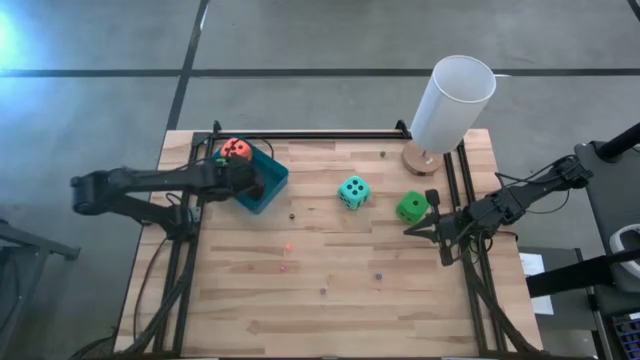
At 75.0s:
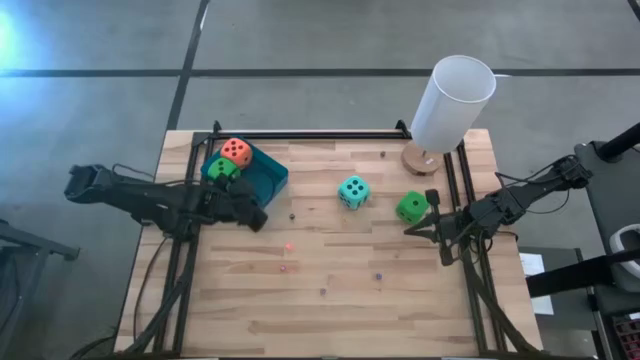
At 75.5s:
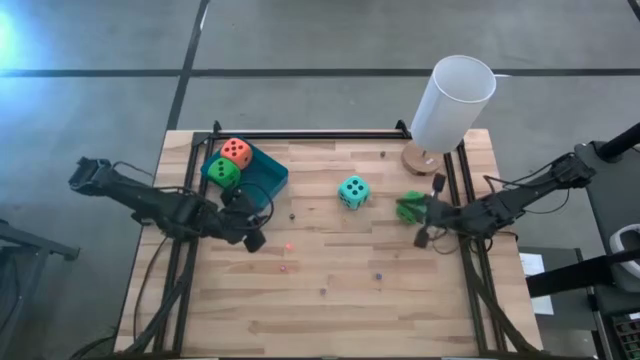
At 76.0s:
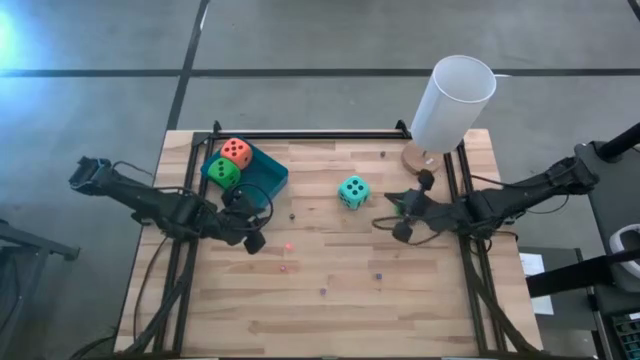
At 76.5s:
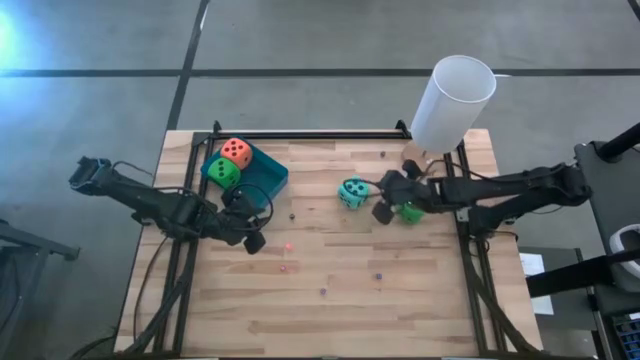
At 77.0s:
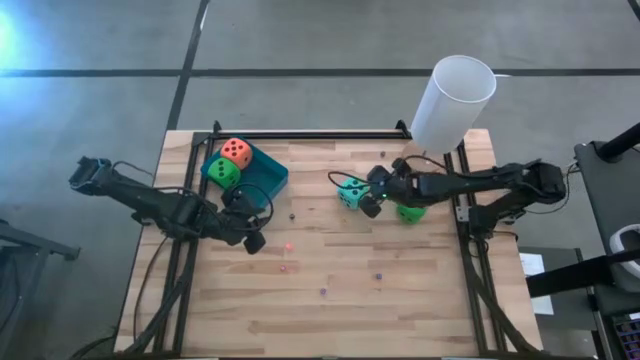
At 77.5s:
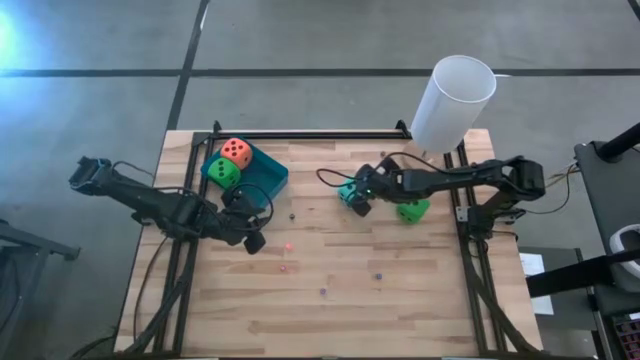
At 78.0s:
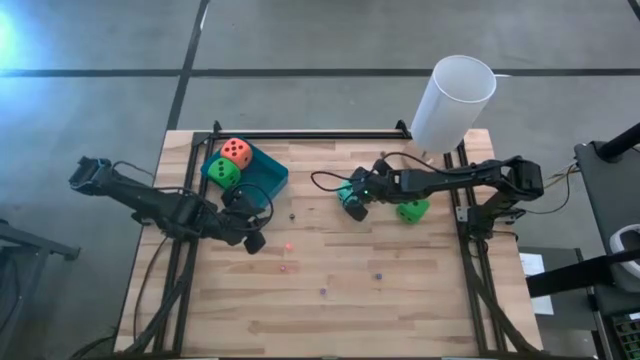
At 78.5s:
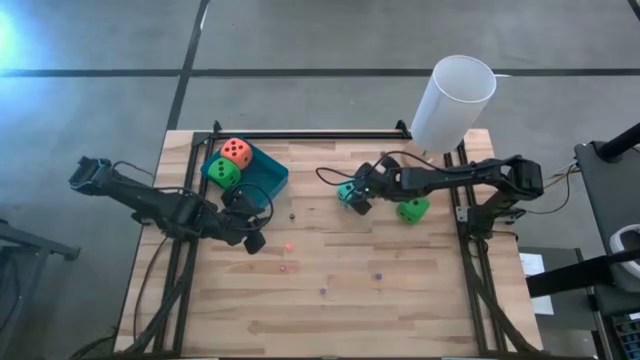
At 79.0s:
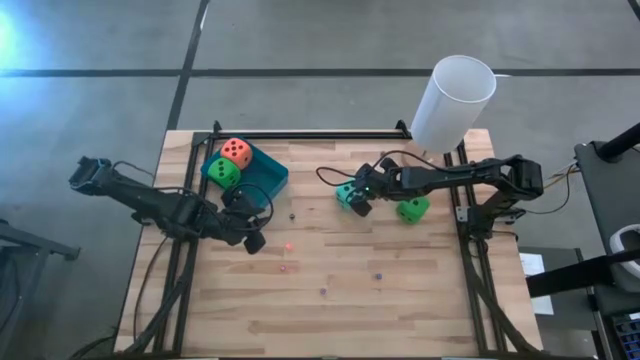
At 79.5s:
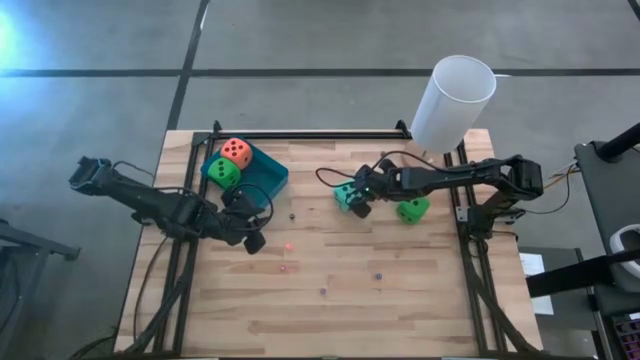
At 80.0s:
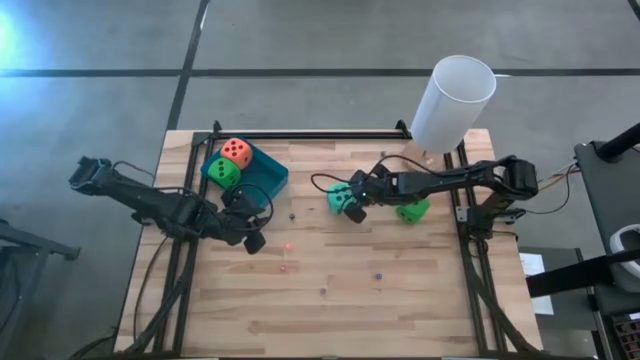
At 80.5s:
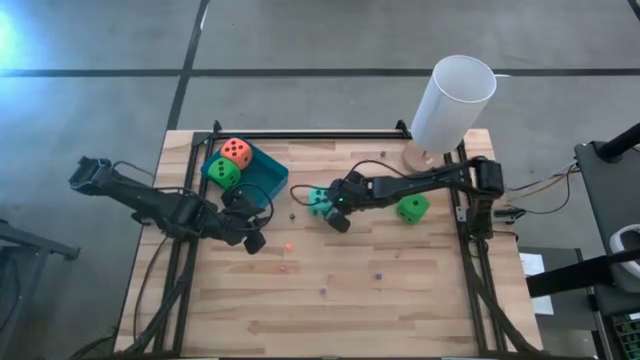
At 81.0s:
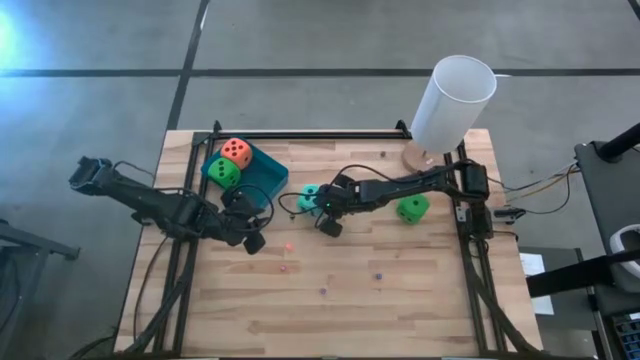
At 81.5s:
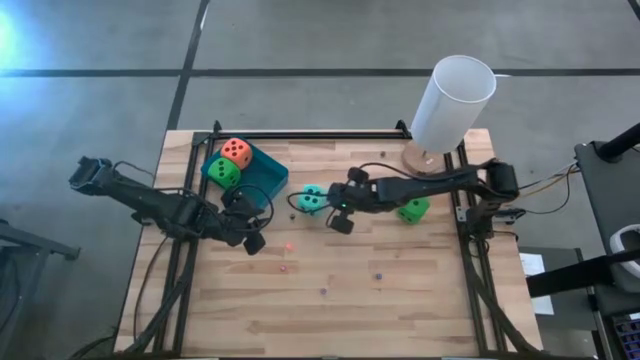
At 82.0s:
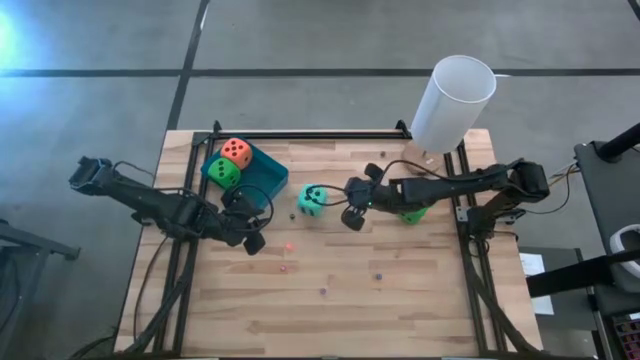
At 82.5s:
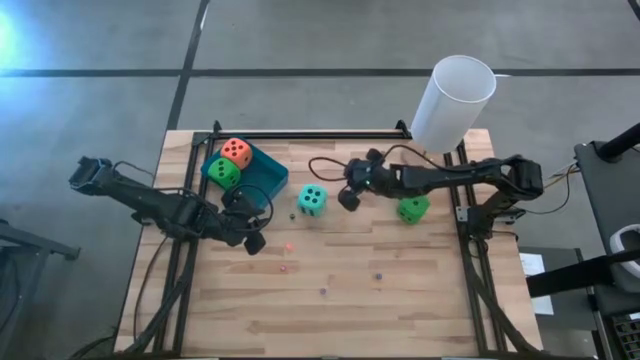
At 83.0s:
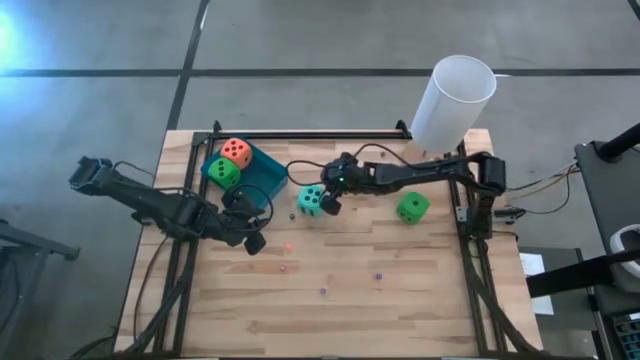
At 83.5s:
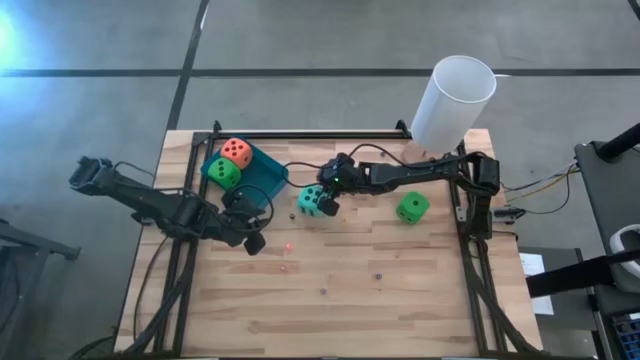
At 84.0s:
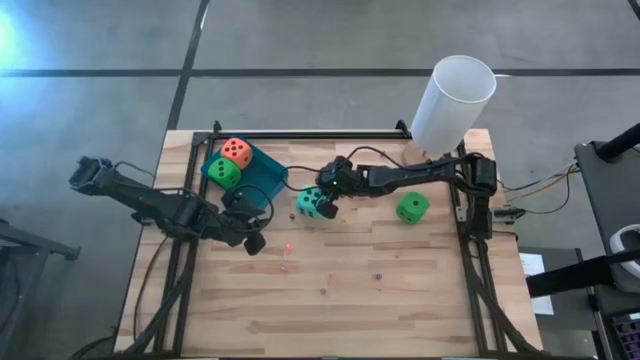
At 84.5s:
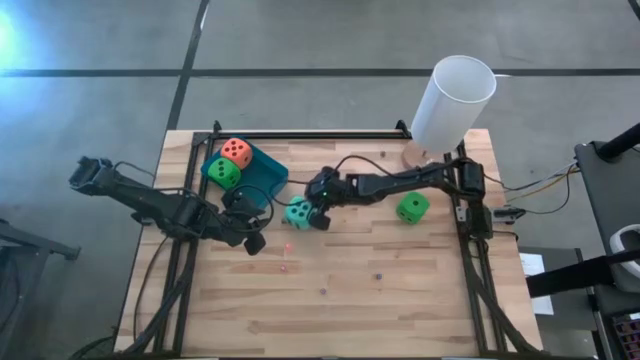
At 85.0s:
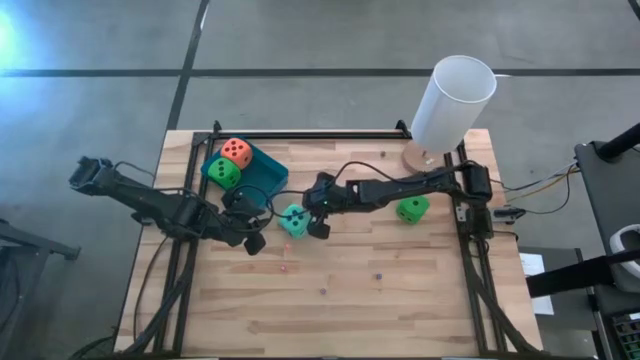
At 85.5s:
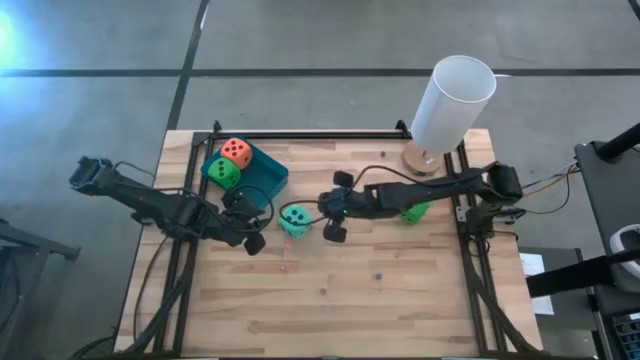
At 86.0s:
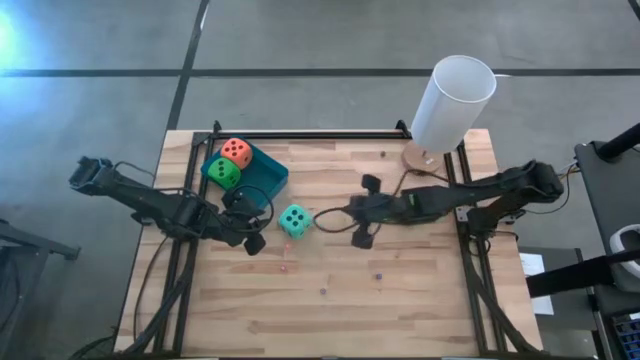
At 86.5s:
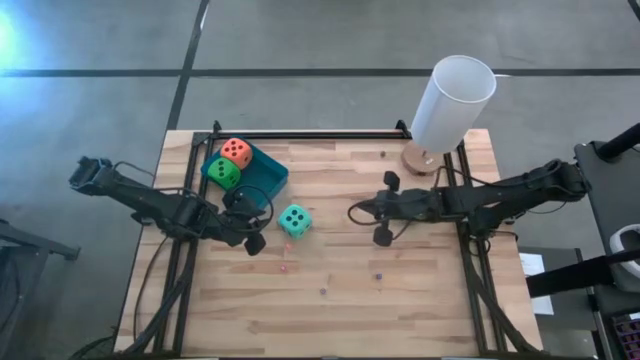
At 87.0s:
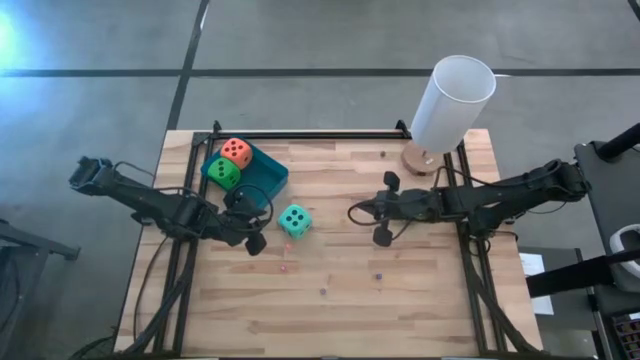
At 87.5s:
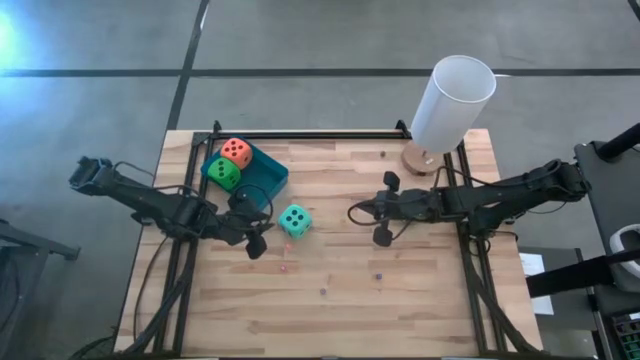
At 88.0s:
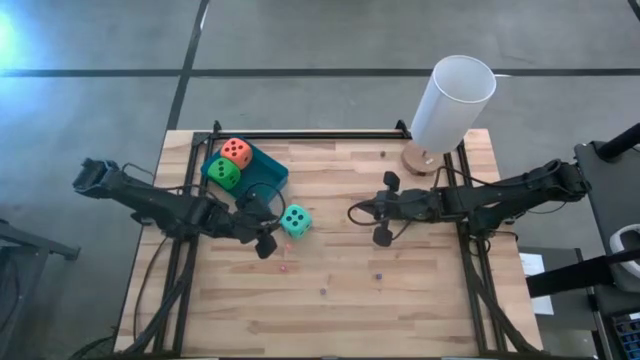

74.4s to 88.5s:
Task: Pick & Place Dice
Put the big blue dice into the blue bin

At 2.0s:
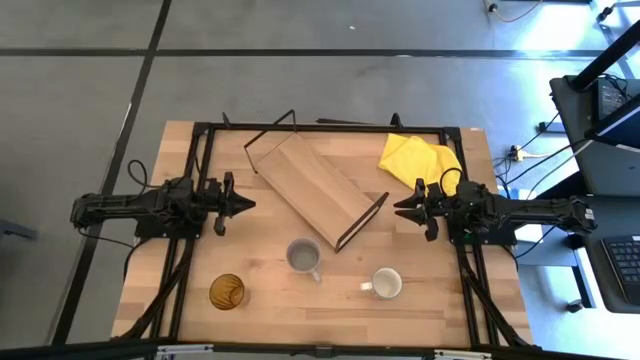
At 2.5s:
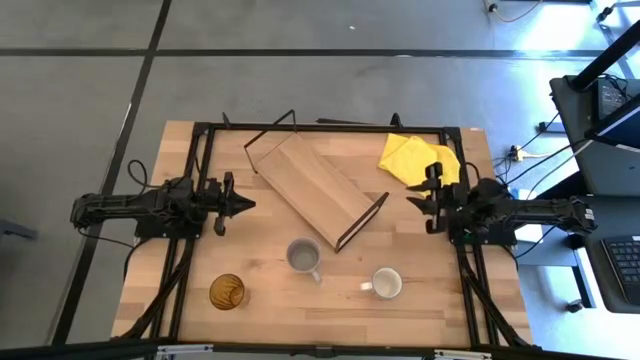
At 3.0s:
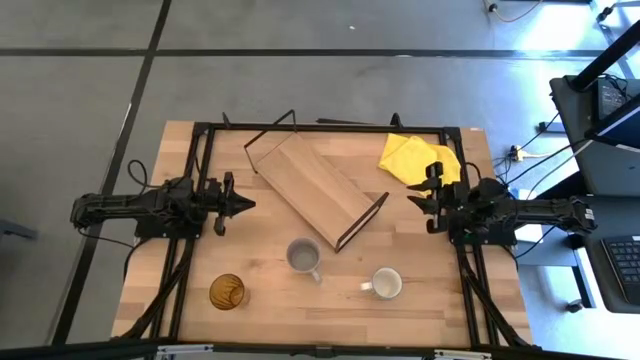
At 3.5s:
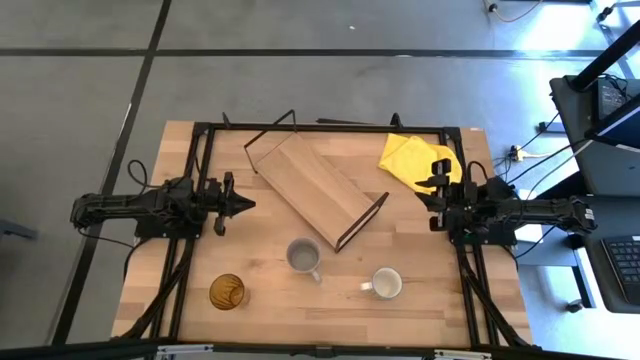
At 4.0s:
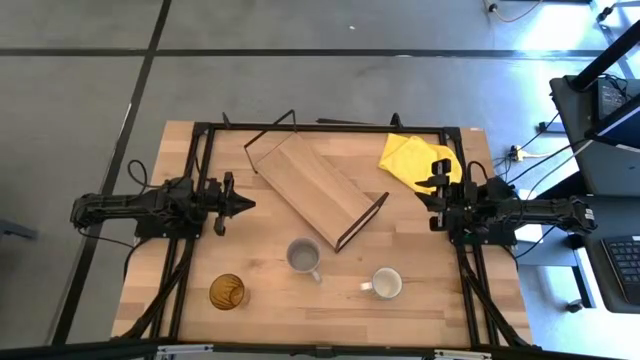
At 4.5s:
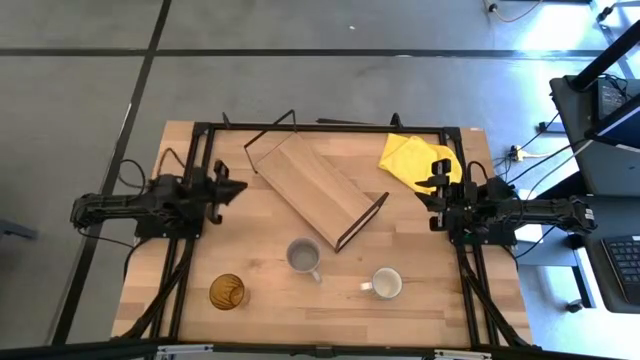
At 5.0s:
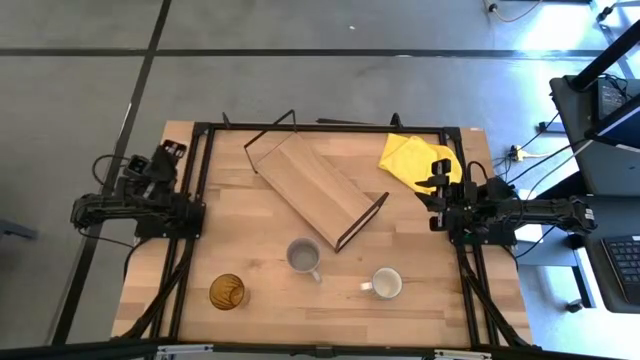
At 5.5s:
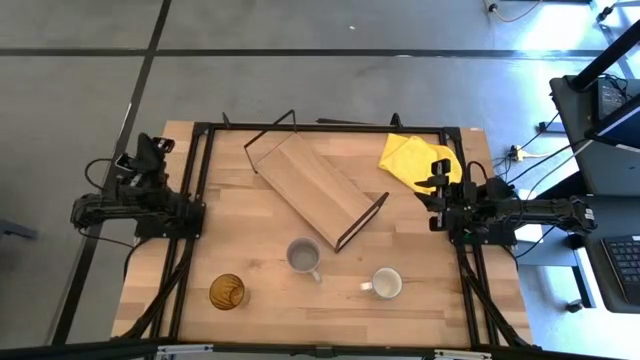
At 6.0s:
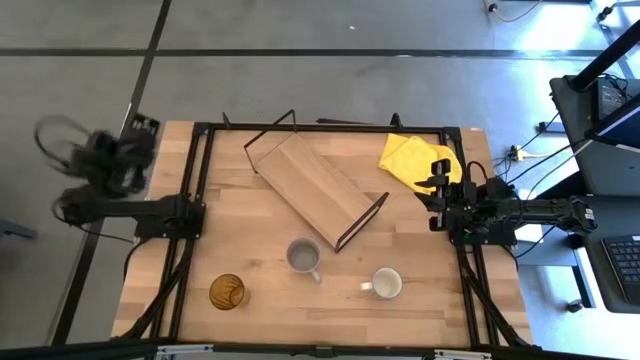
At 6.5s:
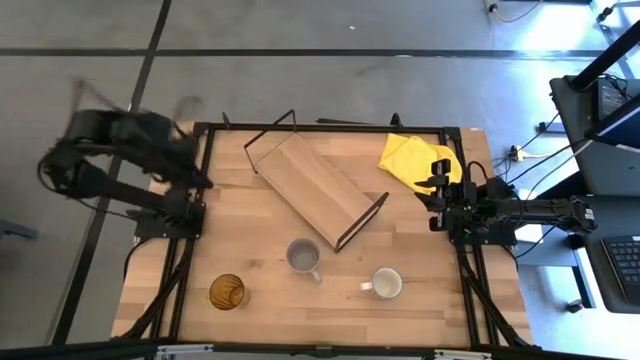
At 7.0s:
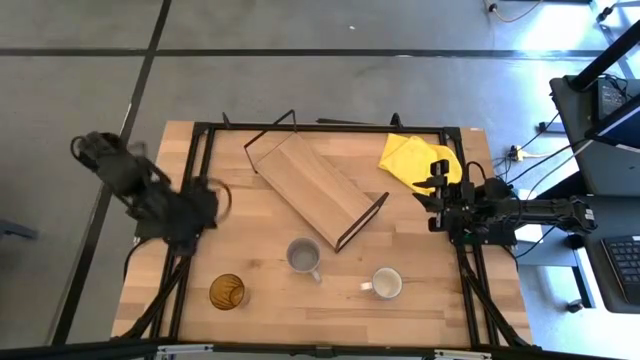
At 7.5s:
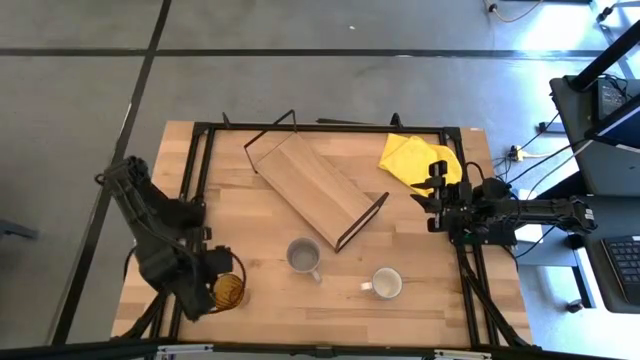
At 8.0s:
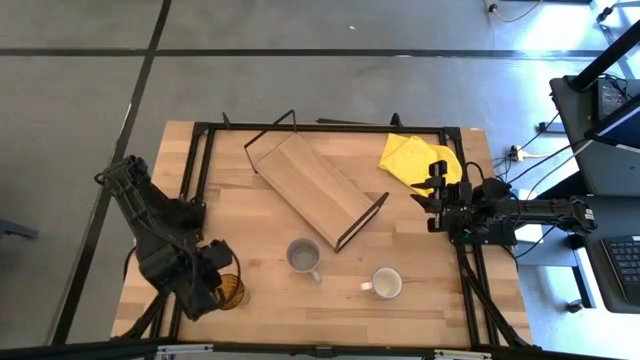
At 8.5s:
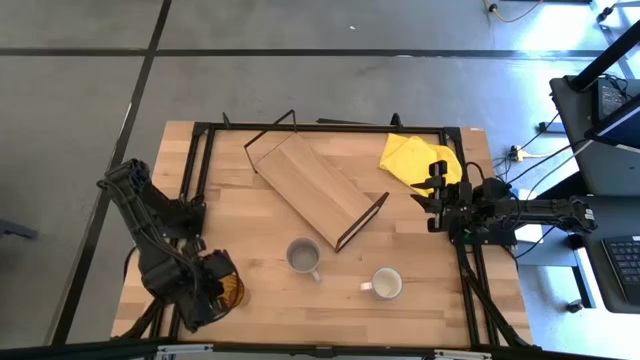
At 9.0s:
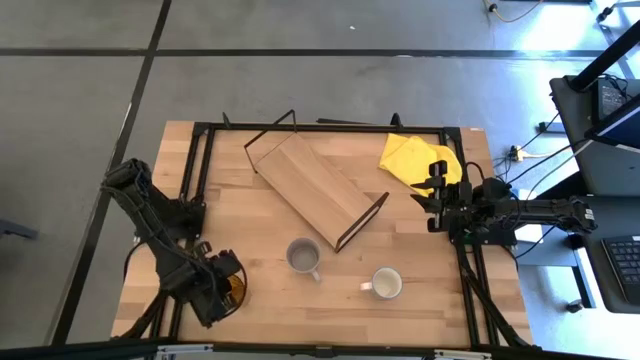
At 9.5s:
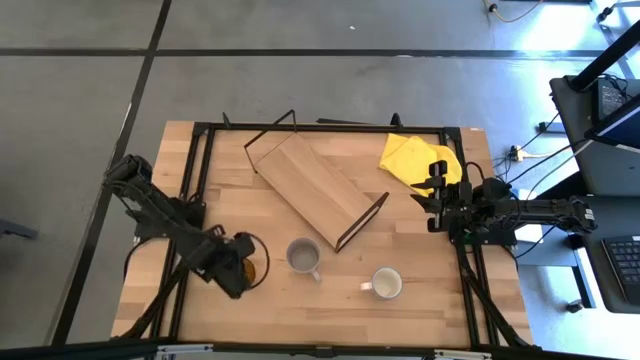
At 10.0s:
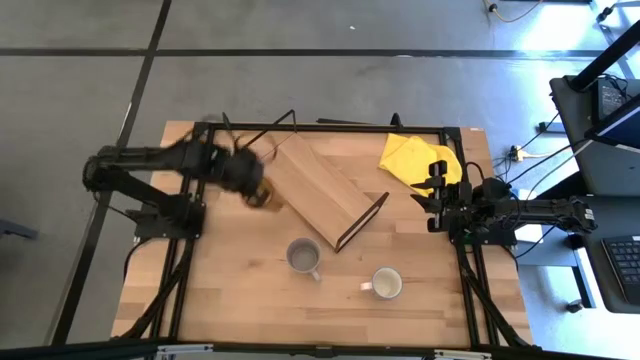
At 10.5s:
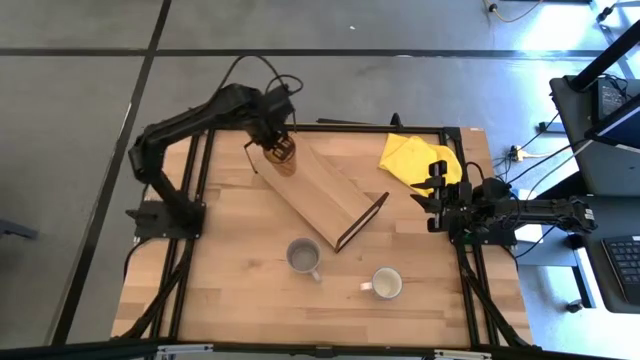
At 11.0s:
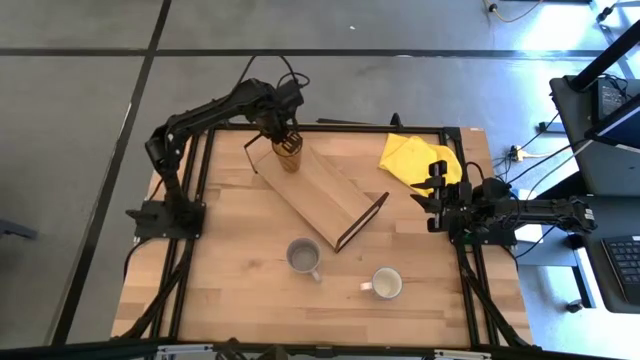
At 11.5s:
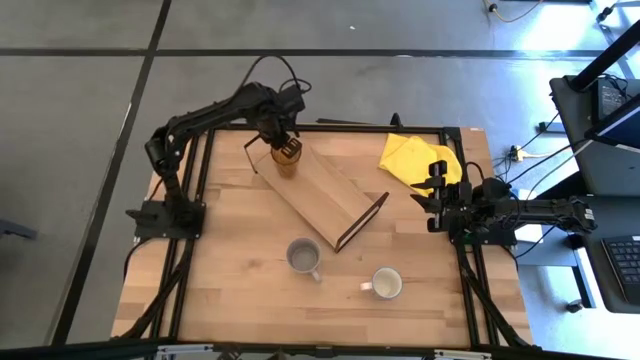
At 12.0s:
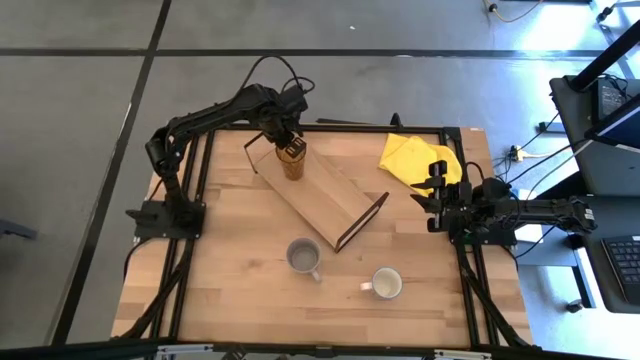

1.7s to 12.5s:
Task: Stack small to large cups/mugs on shelf
Put the yellow cup on the shelf
